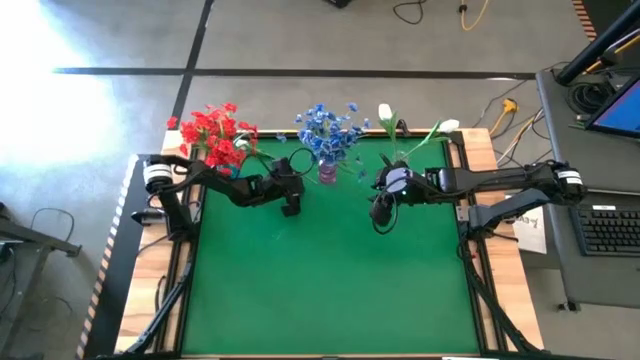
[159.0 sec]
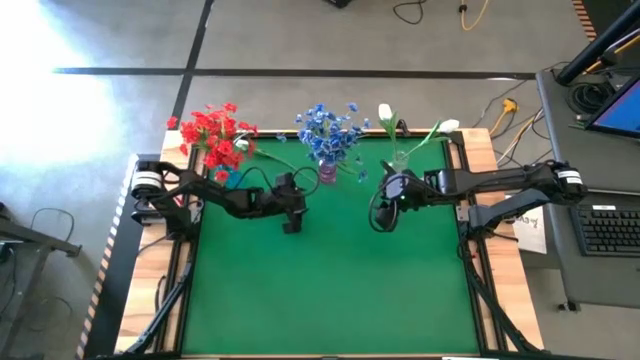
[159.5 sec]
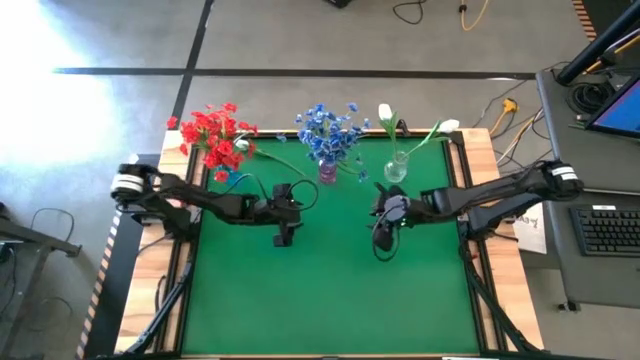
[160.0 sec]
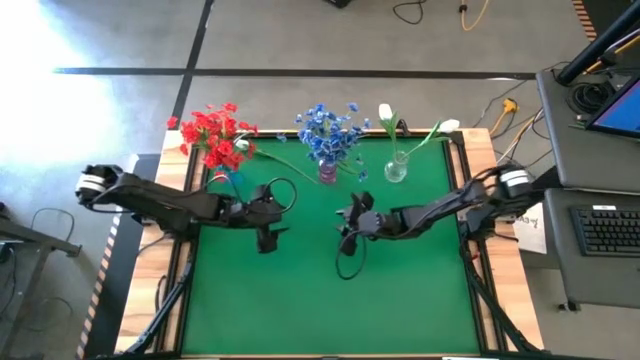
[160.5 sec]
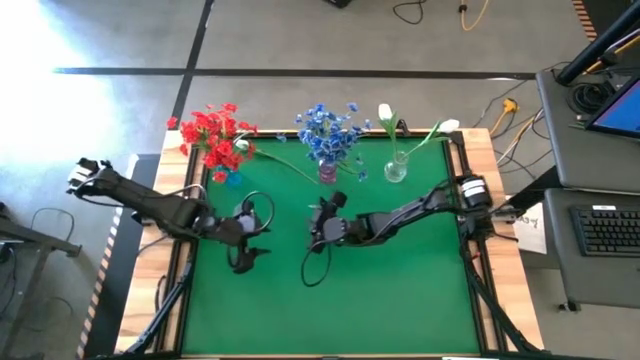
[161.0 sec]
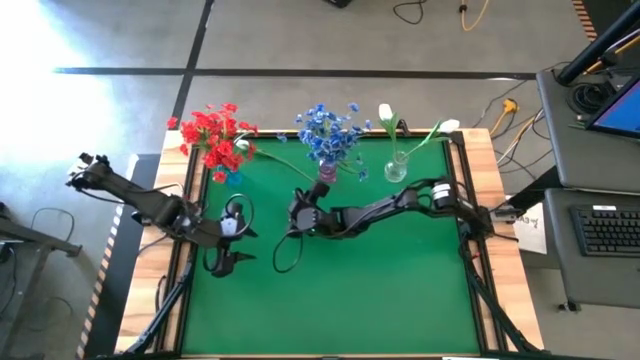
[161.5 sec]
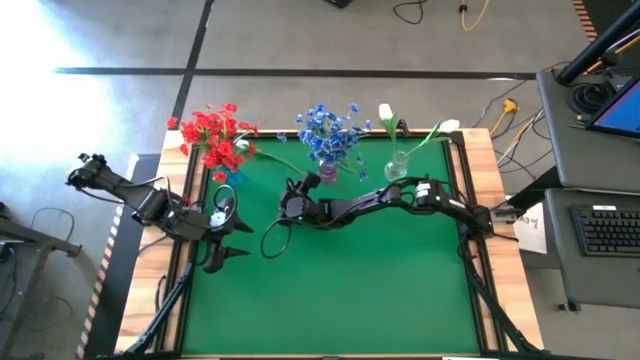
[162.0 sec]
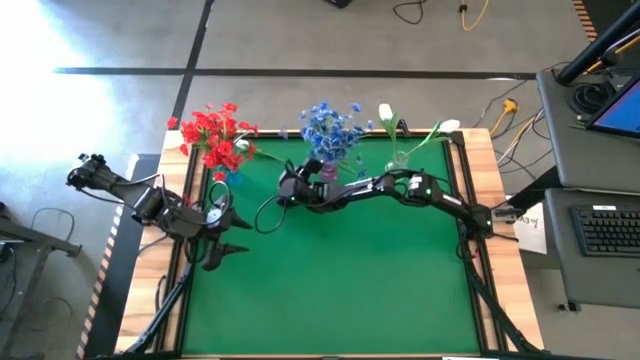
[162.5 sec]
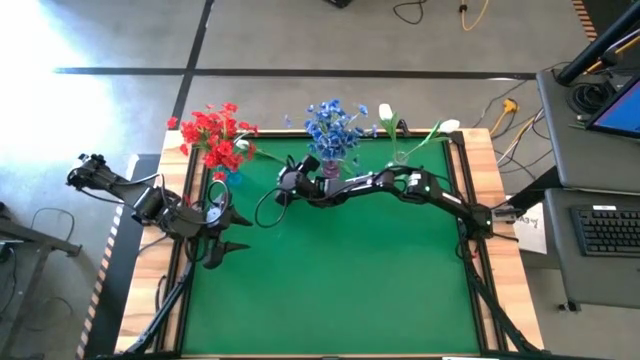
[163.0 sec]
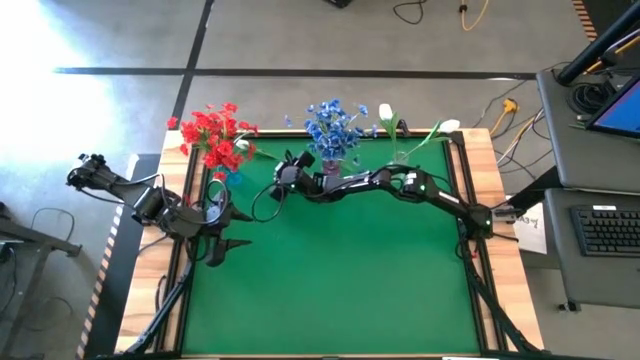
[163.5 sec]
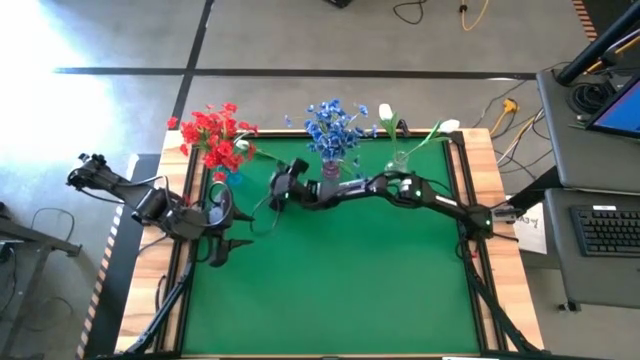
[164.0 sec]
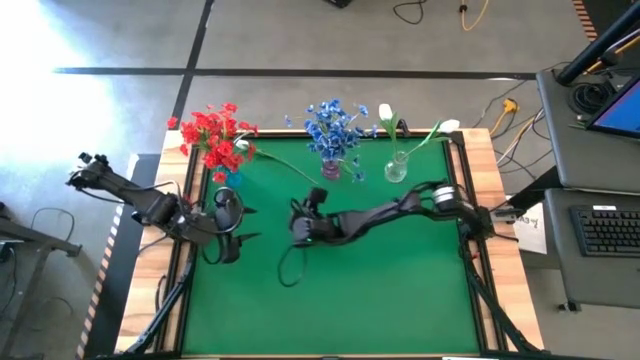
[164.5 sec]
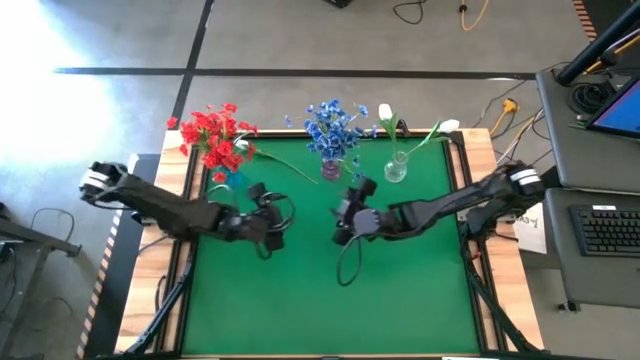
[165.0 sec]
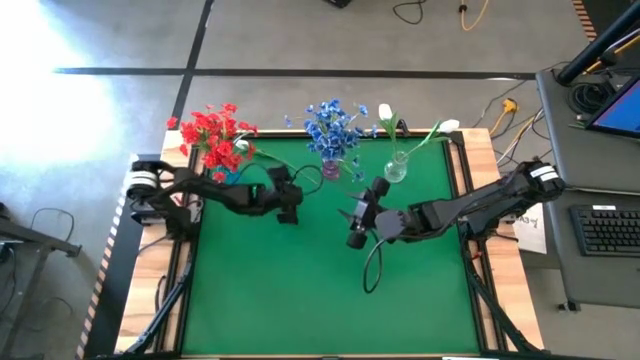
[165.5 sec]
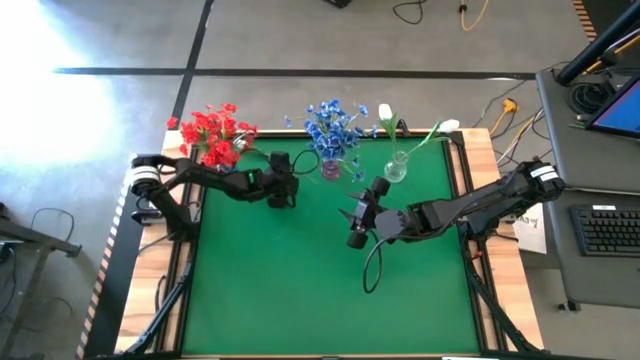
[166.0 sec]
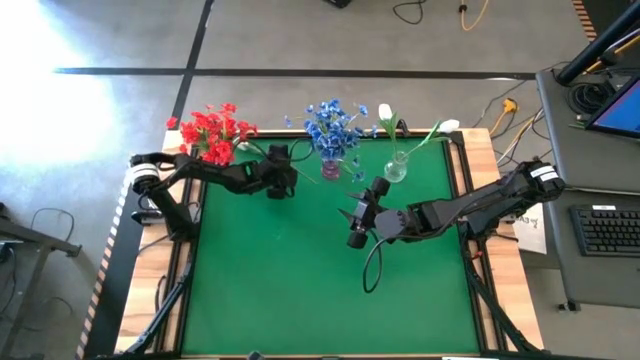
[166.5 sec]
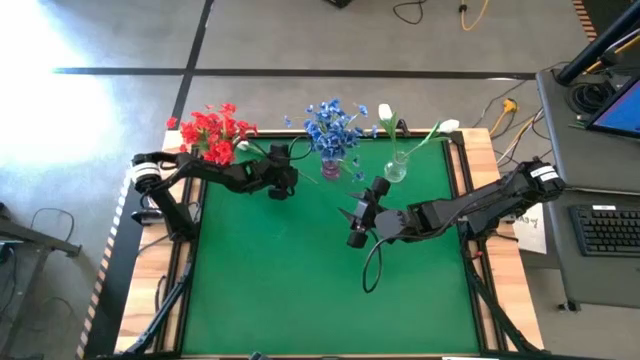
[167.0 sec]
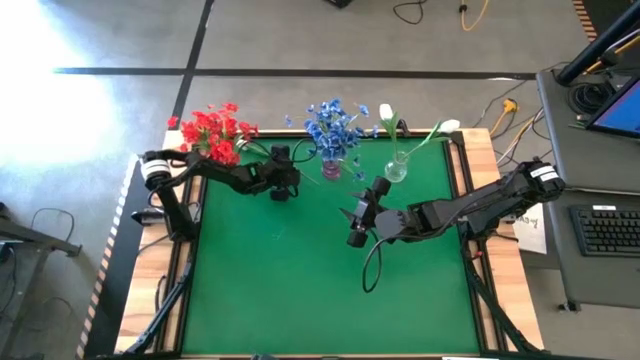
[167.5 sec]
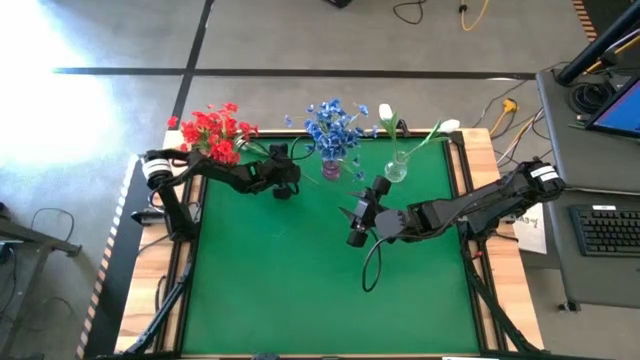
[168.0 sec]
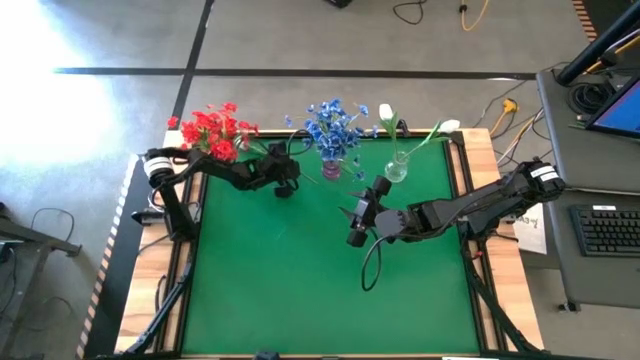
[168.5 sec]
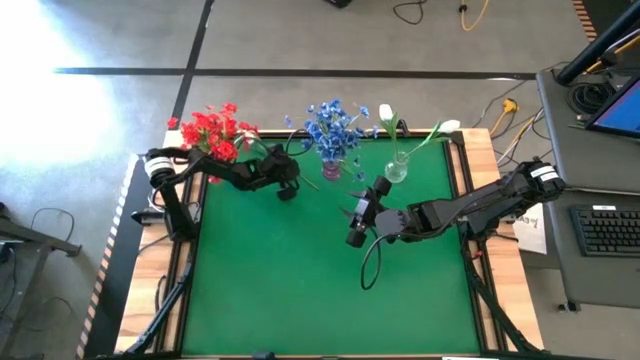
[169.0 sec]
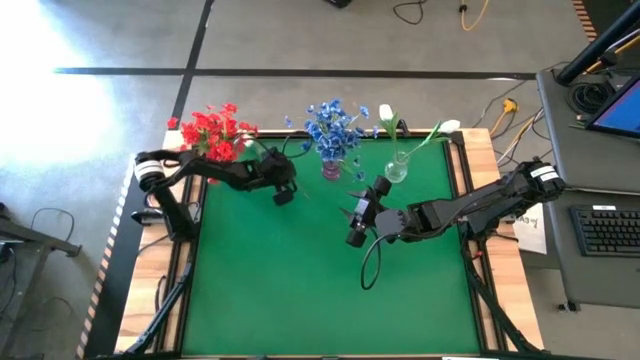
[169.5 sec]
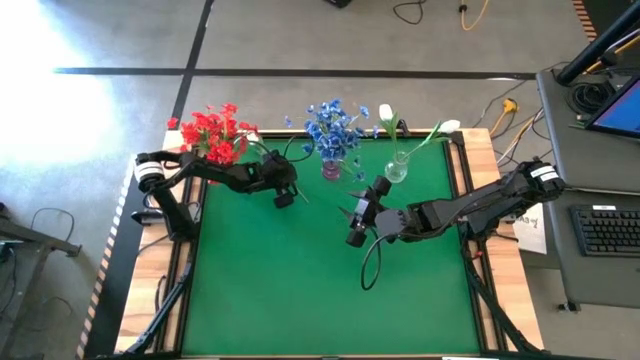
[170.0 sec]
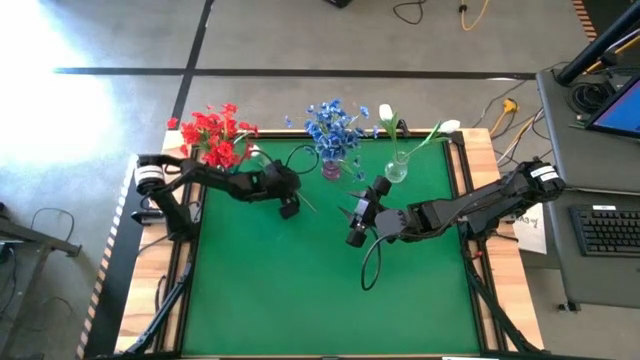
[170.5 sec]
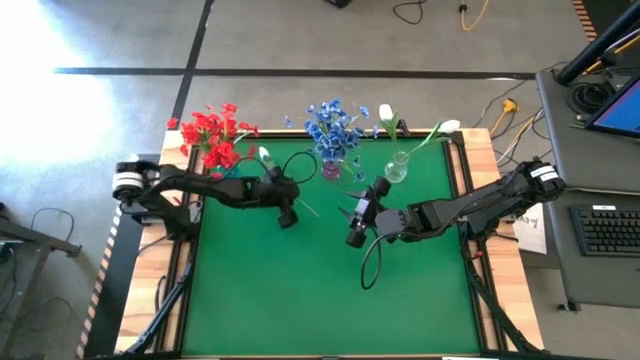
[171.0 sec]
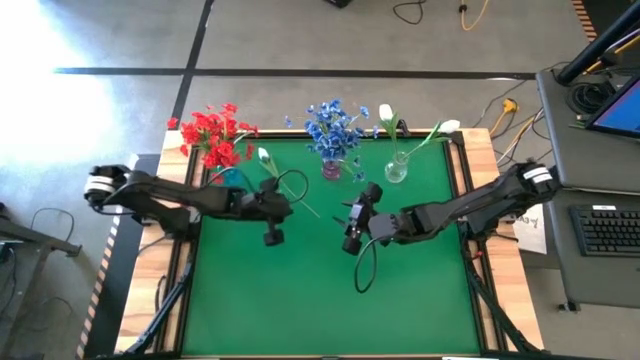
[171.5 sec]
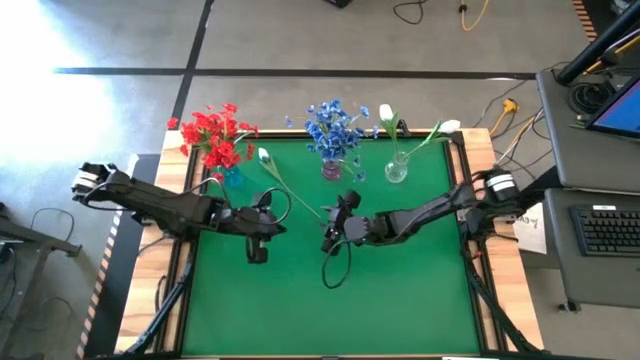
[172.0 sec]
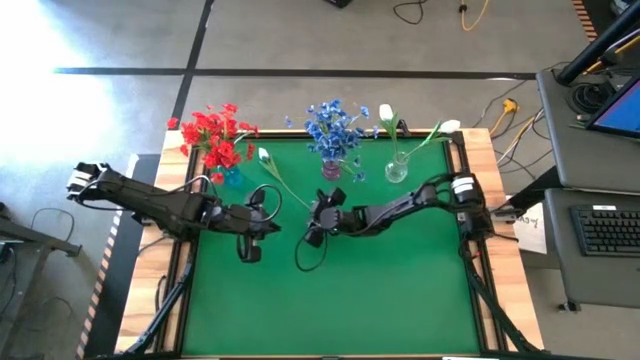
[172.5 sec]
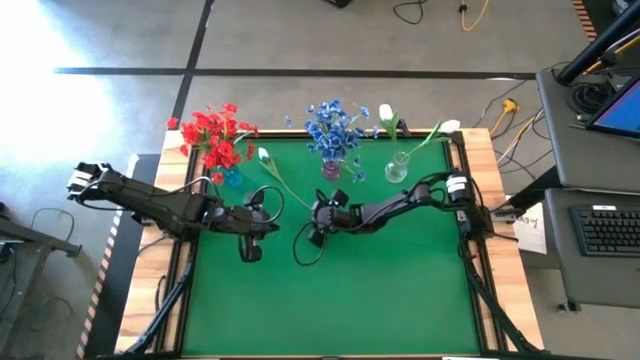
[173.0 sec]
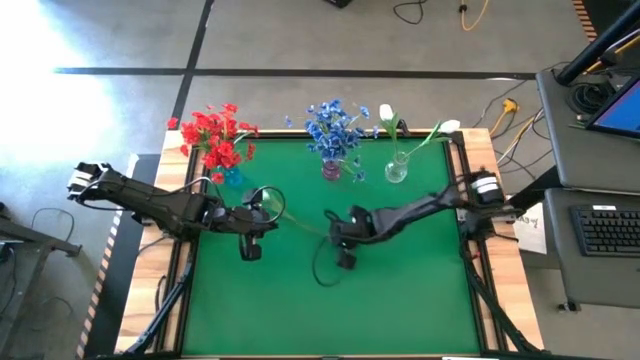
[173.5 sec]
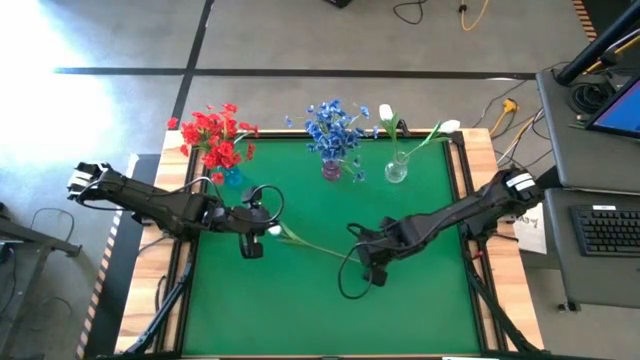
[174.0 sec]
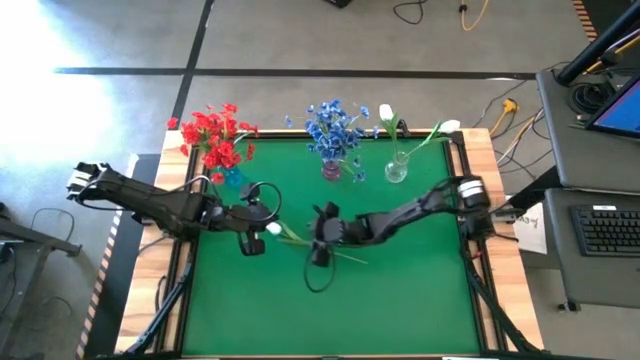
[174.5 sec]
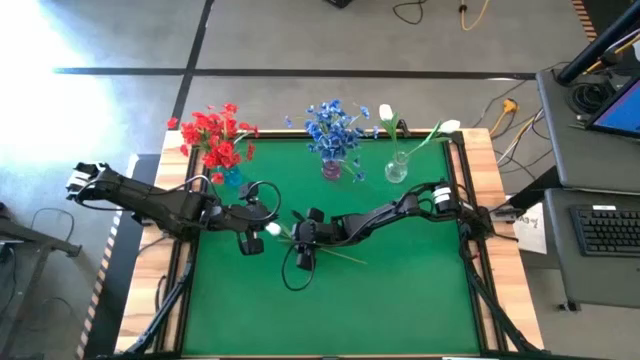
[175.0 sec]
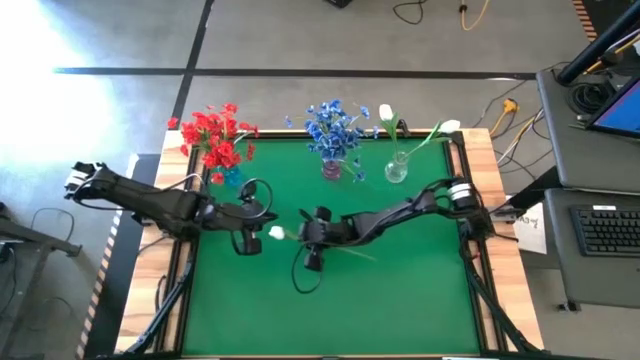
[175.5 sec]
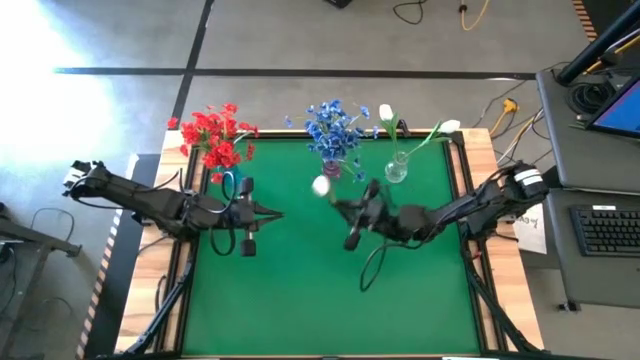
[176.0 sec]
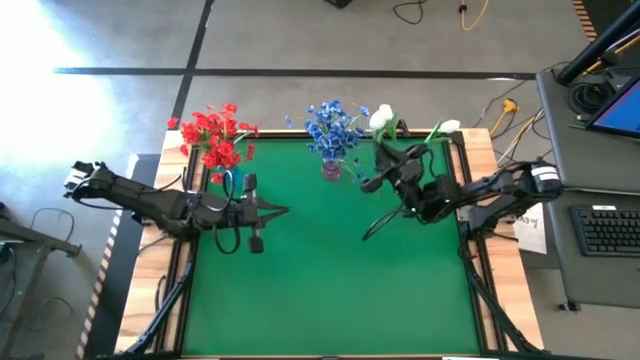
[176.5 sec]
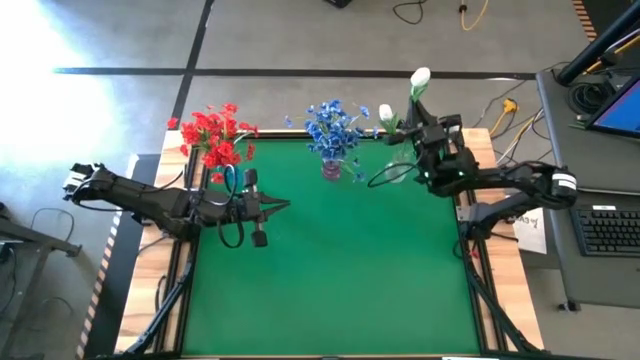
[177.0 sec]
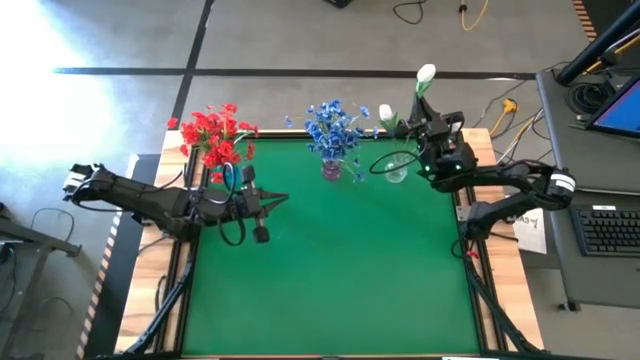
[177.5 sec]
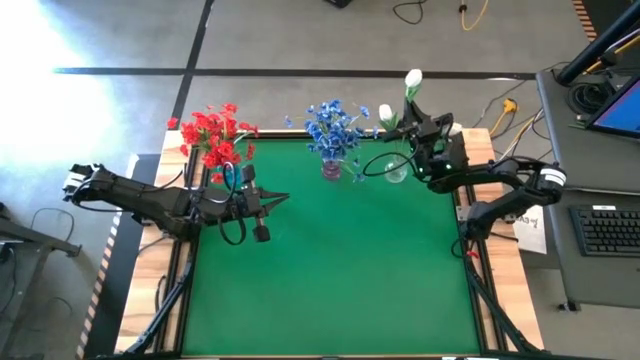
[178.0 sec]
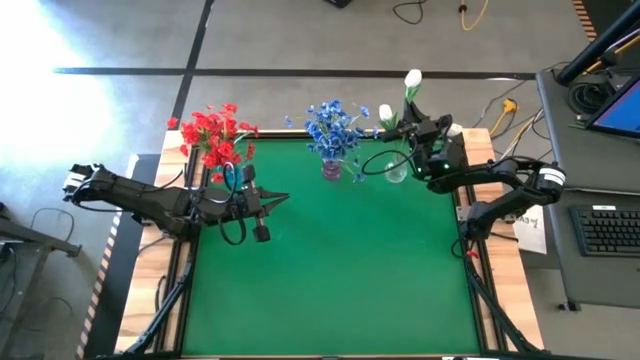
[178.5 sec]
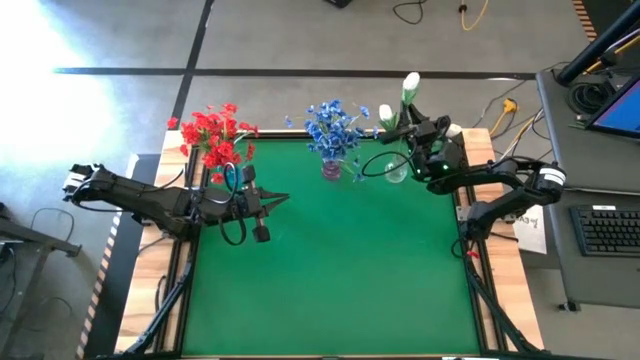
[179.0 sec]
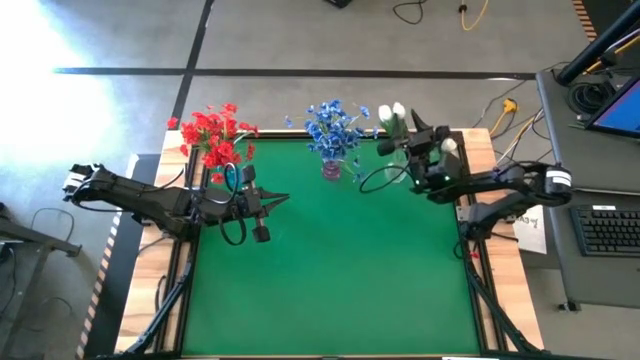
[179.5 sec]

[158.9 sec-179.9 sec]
Task: Sort flowers into vase by color
Put the white flower into the transparent vase

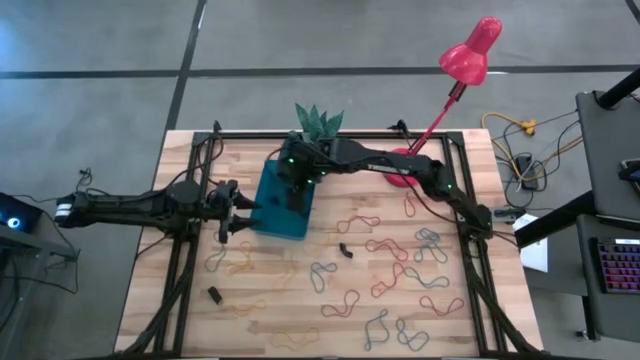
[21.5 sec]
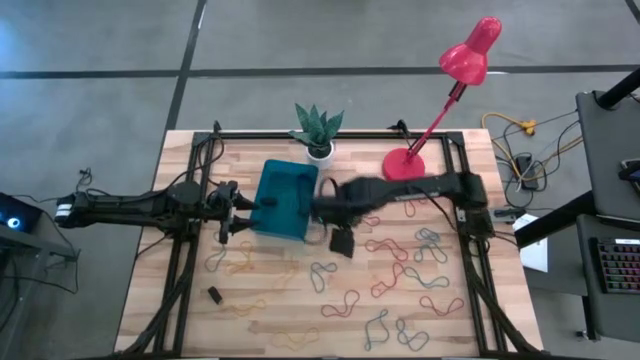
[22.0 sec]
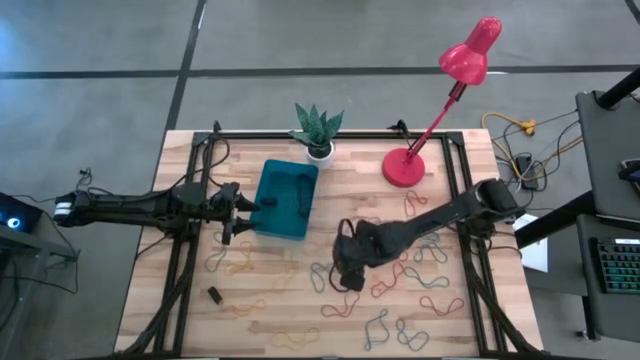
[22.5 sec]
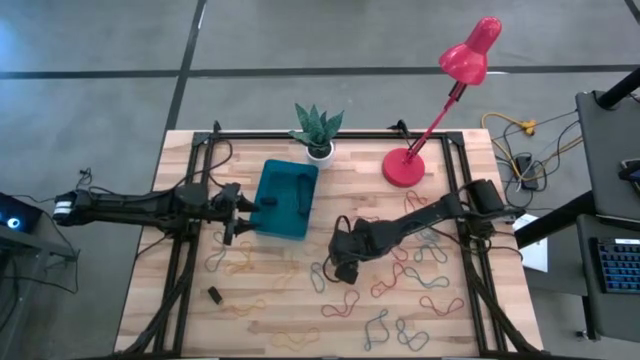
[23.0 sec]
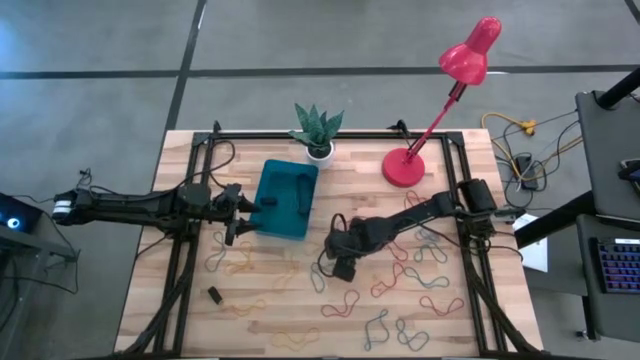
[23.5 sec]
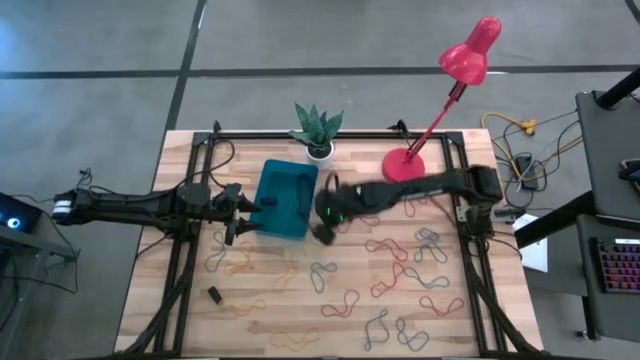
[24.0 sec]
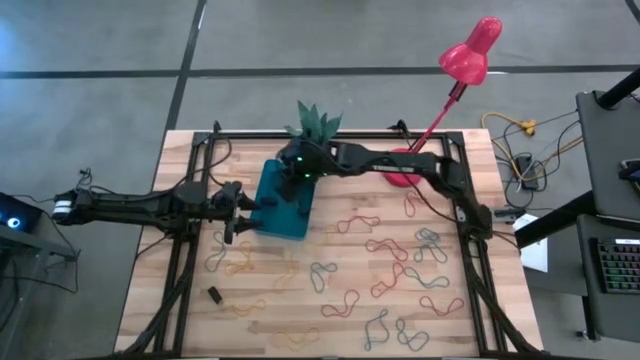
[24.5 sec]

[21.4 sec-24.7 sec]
Task: Pick and place rubber bands into bin
Put the black rubber band into the blue bin
